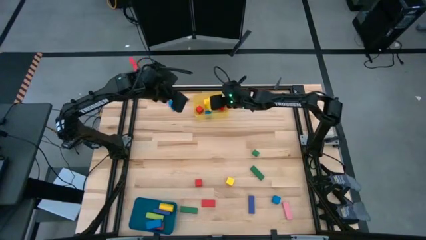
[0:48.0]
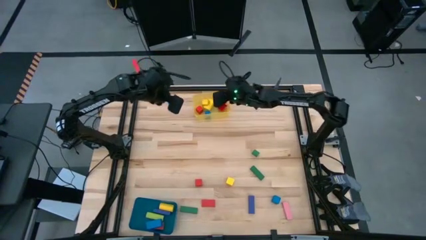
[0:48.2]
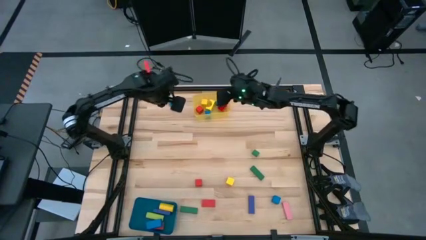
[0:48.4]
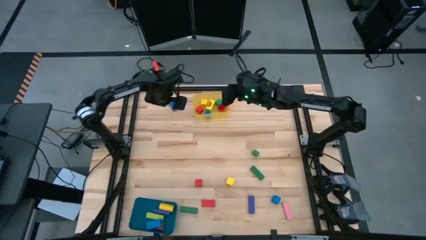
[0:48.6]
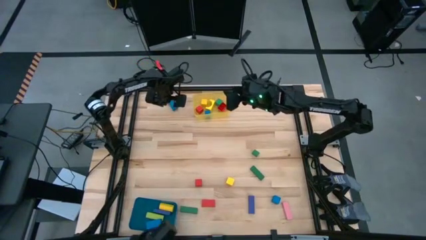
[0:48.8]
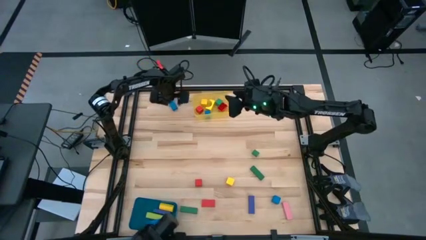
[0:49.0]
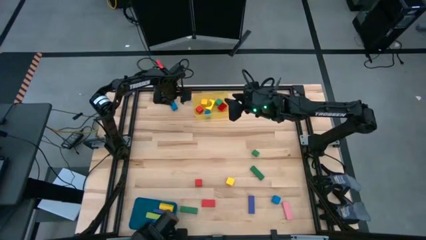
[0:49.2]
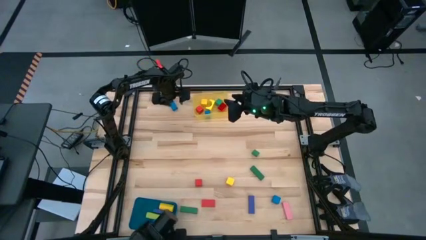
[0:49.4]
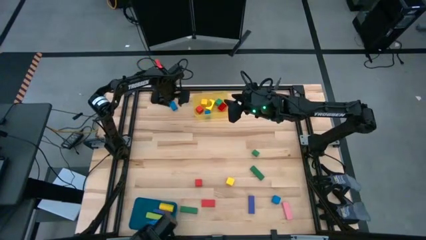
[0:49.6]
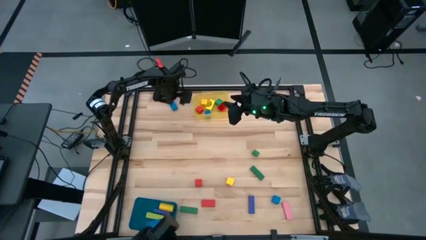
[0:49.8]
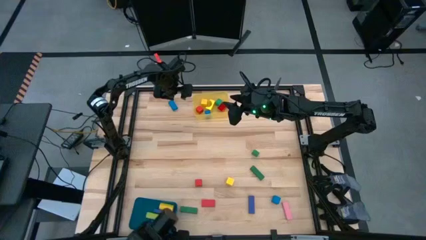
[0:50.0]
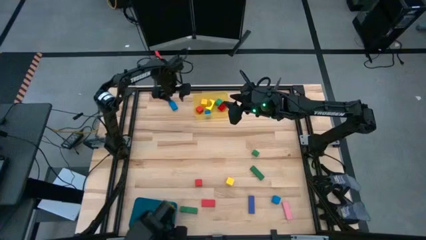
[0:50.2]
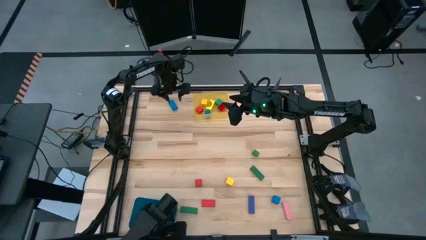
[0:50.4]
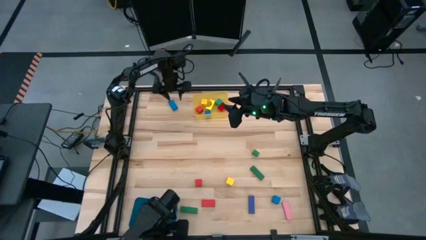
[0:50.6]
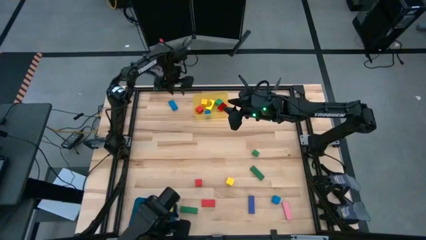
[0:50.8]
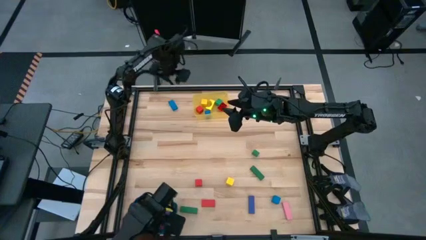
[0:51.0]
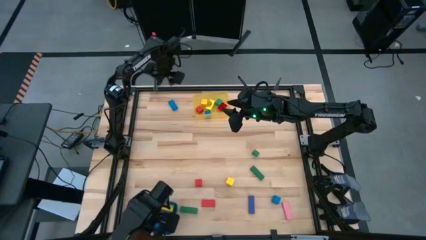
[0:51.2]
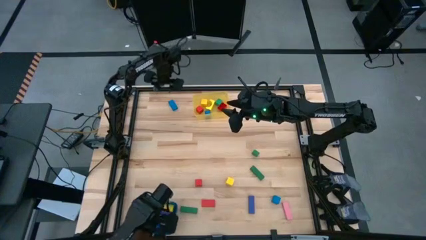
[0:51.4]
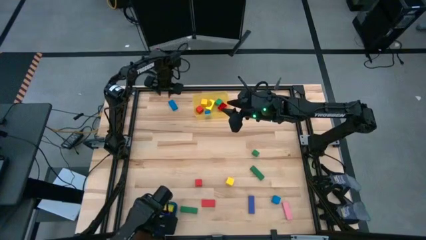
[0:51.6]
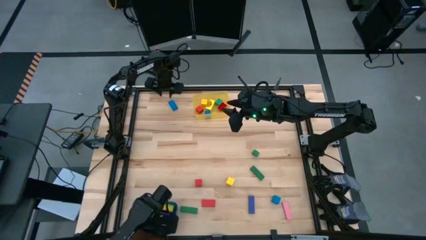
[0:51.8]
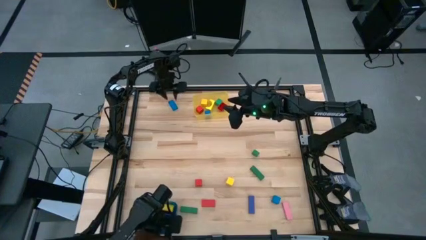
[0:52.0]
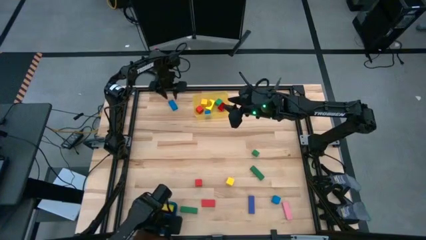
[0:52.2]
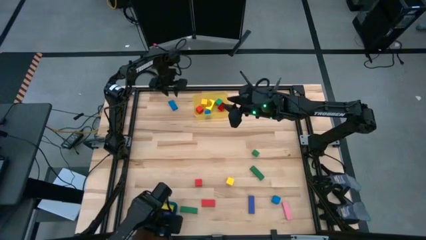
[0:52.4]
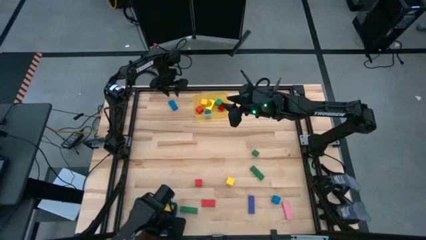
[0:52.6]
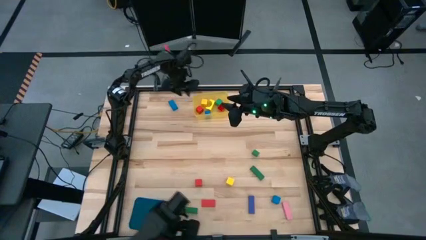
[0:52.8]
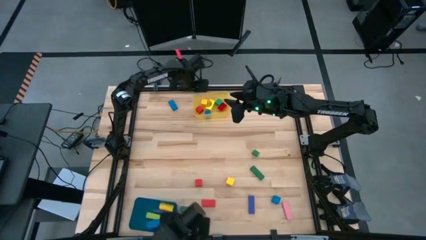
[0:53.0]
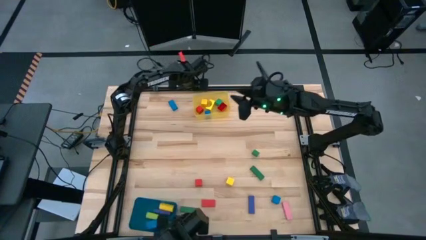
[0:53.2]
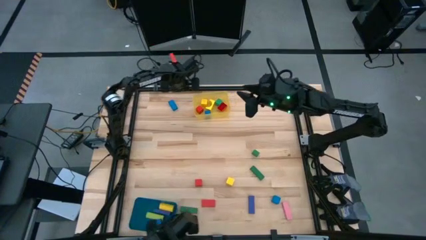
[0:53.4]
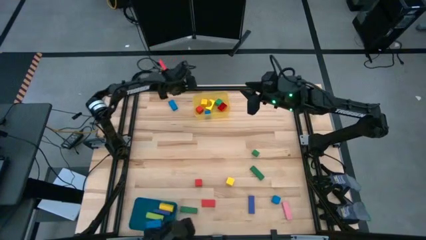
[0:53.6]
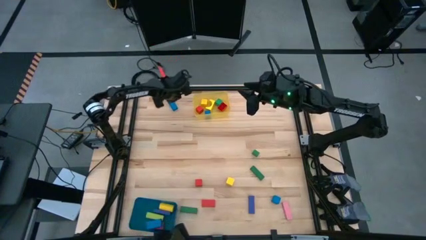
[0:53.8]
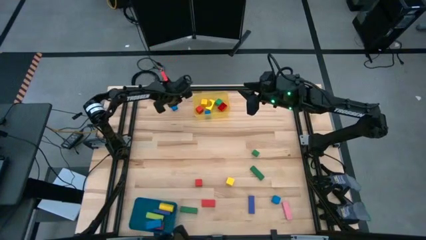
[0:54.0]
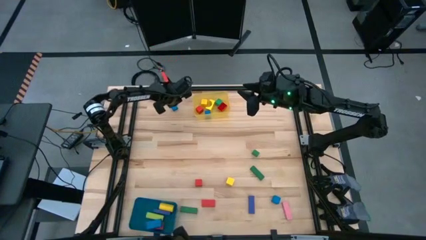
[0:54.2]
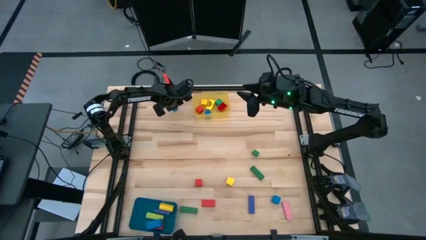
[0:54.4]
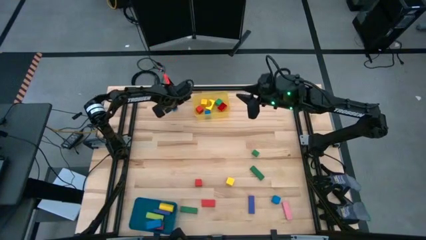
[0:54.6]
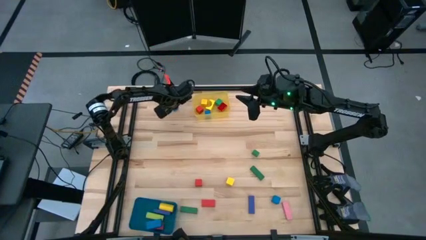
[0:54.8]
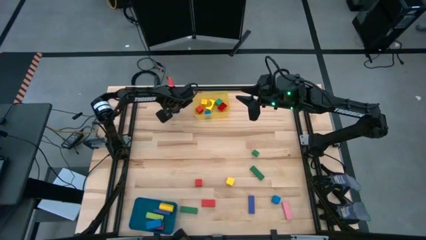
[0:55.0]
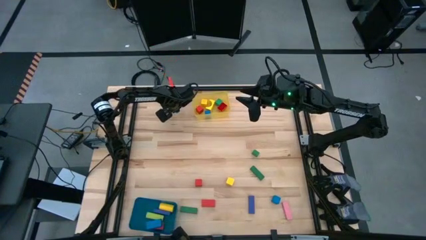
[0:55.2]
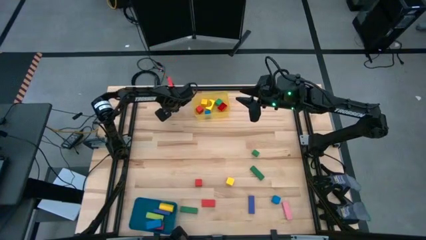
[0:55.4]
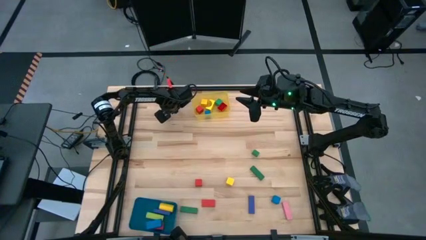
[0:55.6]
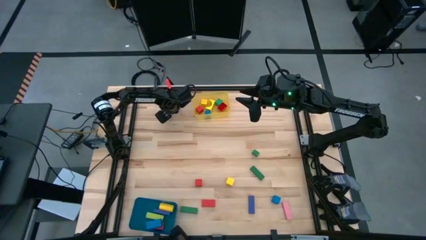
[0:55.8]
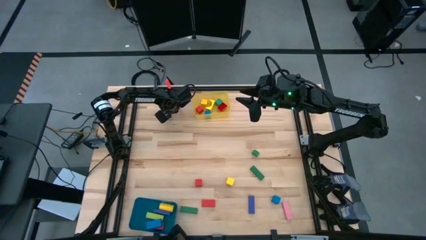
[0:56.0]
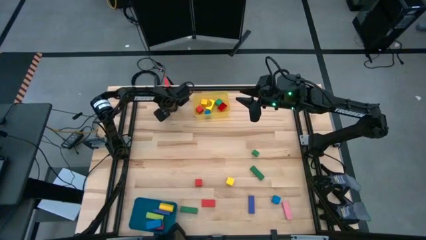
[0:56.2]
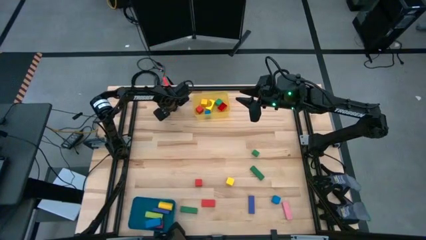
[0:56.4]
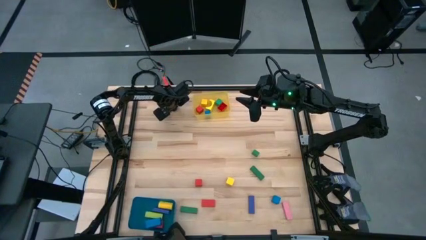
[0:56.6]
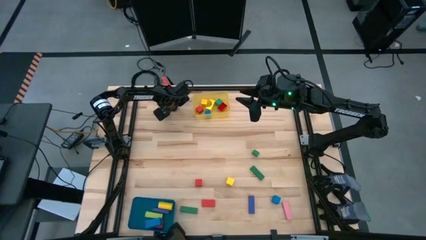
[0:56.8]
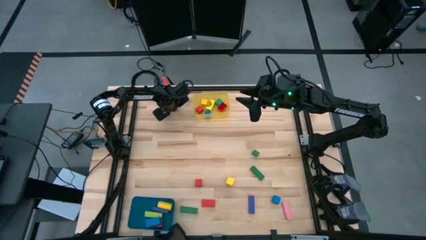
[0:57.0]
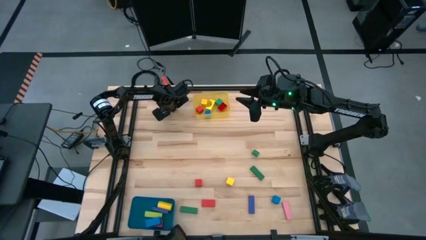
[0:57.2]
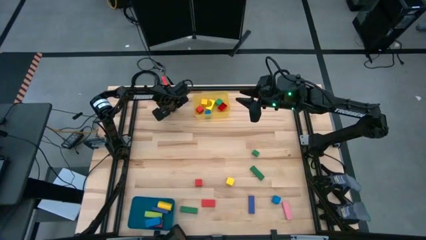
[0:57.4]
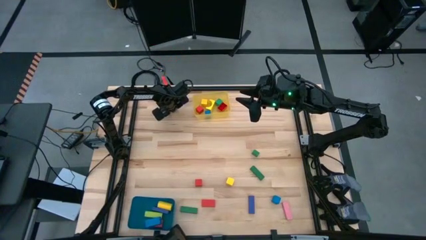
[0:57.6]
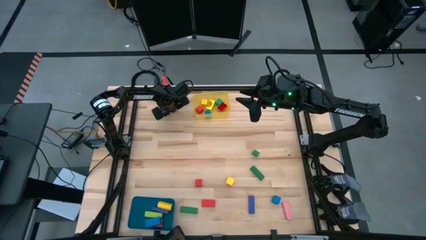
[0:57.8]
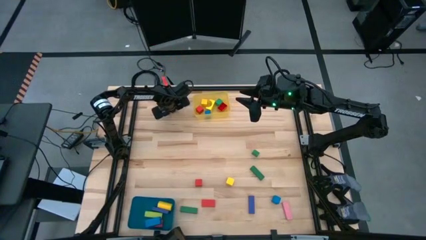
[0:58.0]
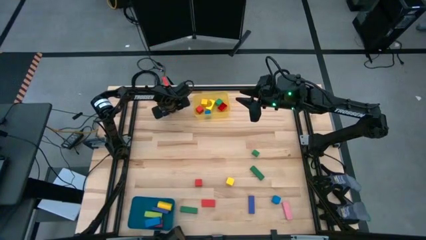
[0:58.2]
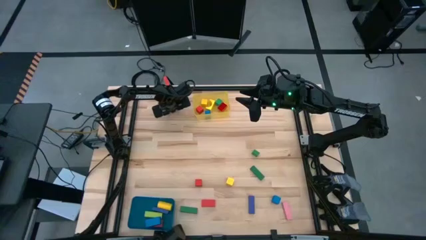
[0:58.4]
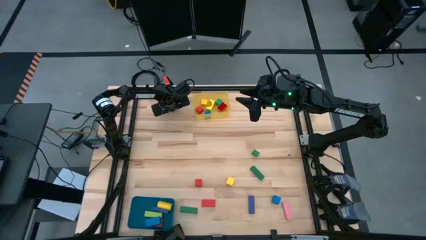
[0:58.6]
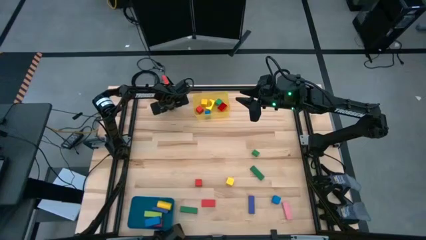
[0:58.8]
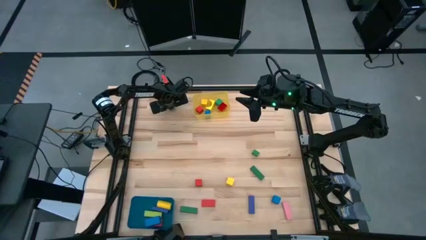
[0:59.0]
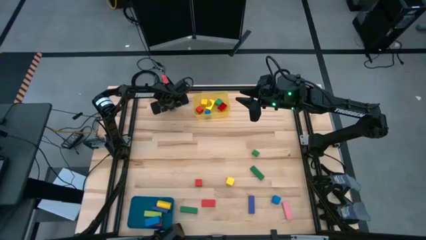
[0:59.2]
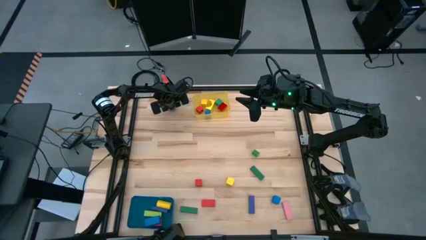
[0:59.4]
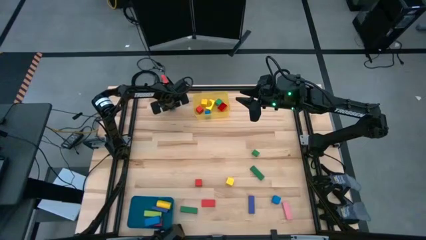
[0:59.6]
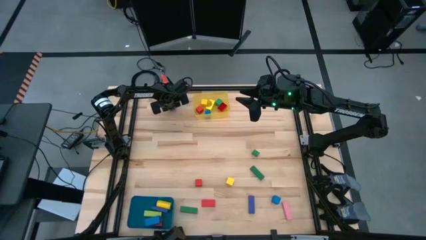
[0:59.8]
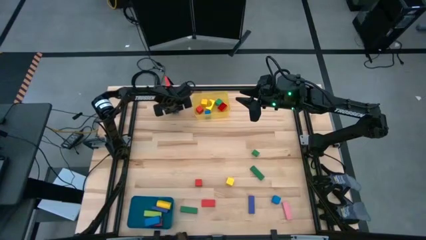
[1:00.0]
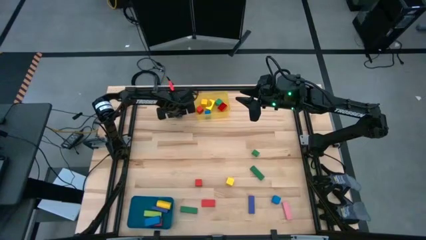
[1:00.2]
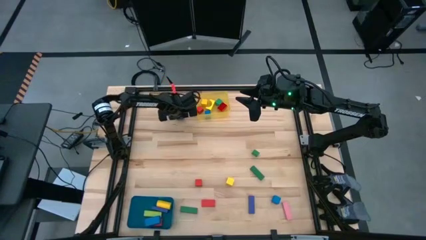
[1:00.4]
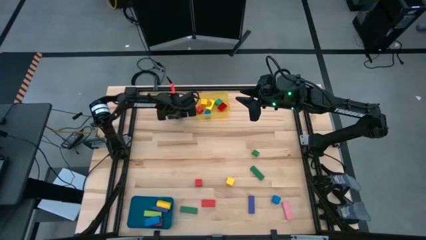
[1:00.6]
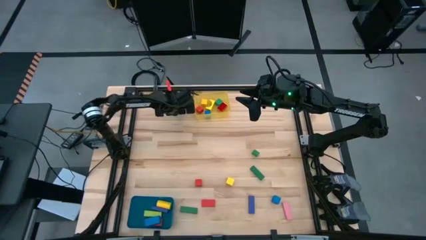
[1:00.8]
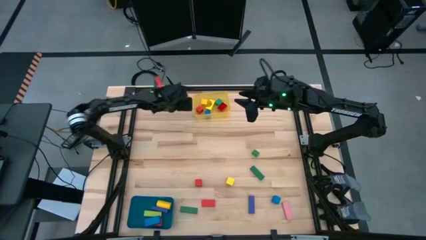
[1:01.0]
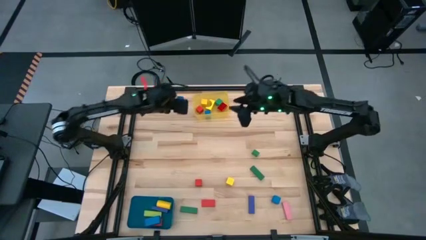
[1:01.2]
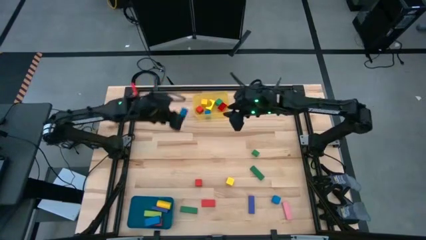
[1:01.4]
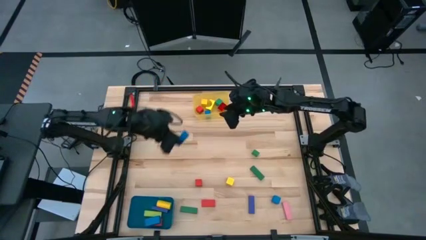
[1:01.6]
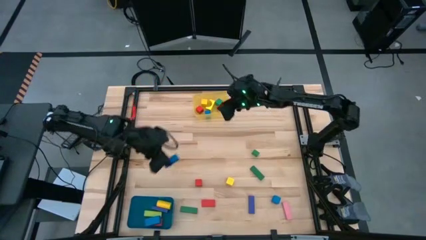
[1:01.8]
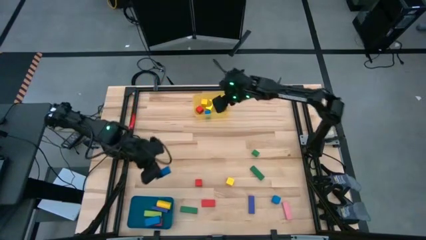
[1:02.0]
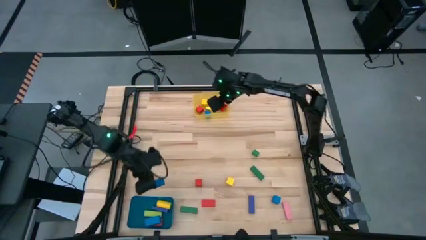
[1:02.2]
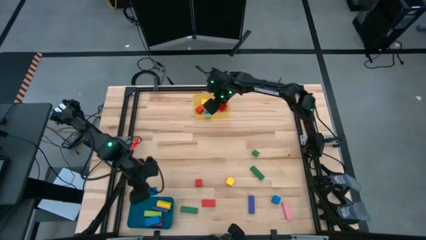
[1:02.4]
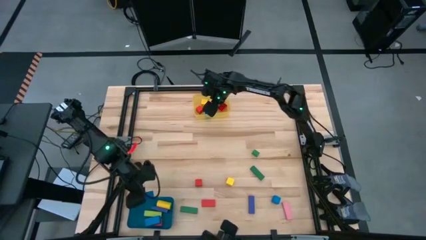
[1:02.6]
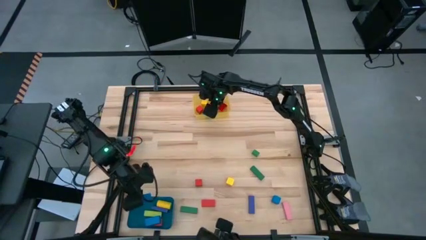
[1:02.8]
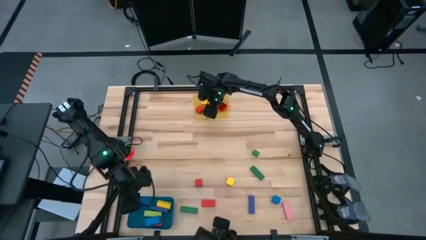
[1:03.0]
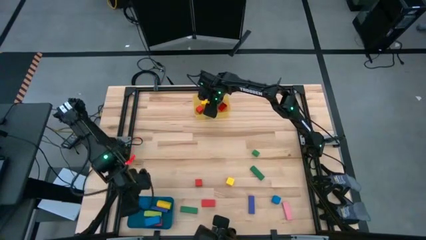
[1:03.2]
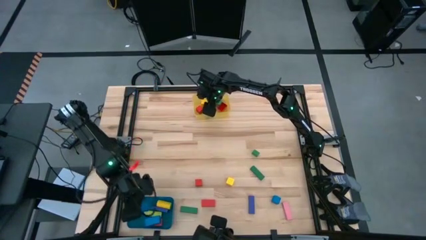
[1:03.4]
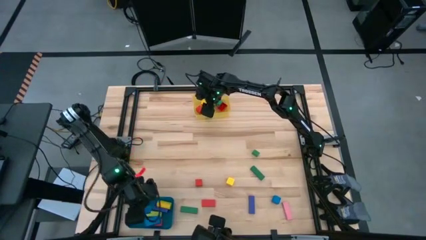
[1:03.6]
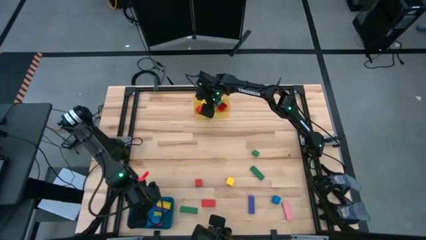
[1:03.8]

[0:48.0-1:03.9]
Task: Sort blocks by size
Put the blue rectangular block into the blue bin
